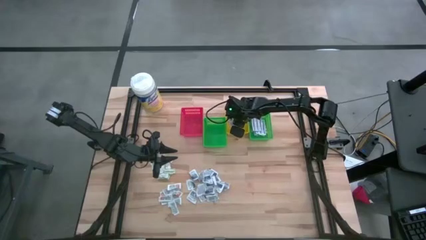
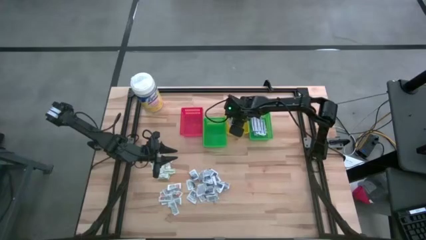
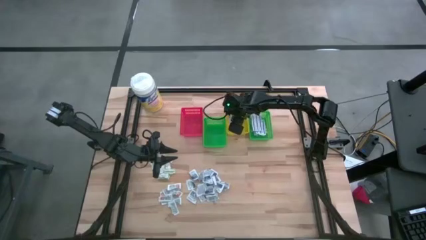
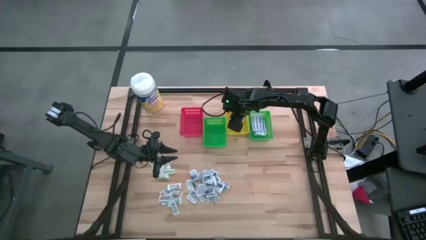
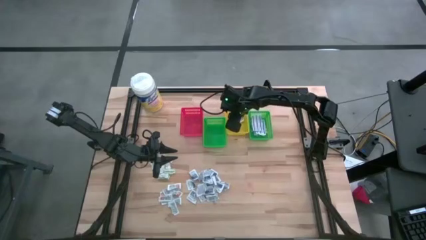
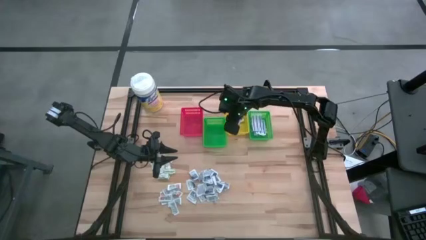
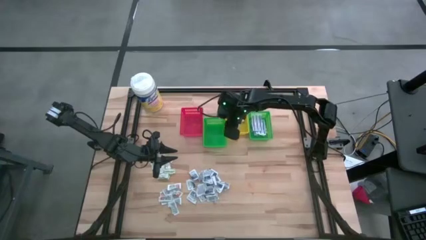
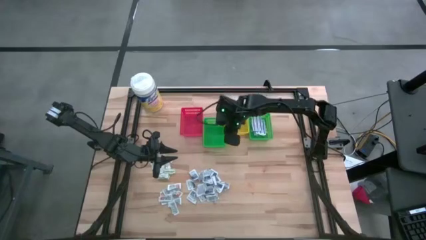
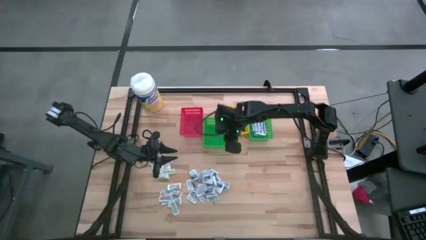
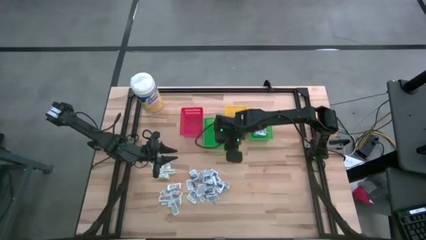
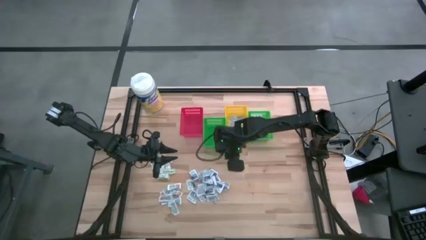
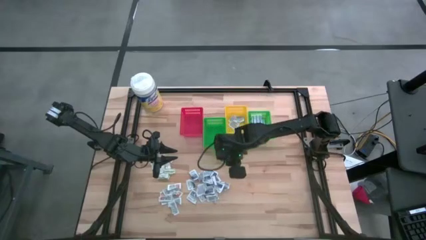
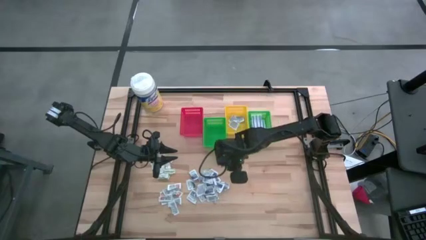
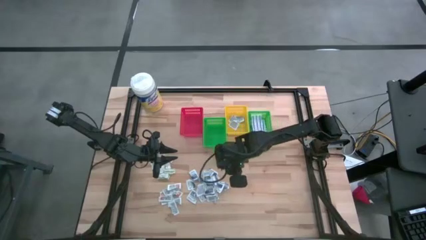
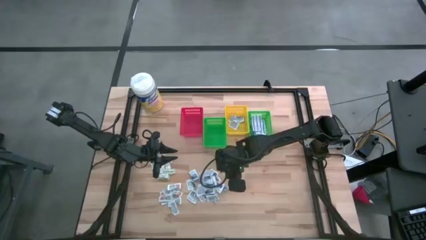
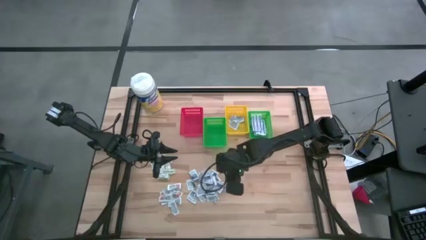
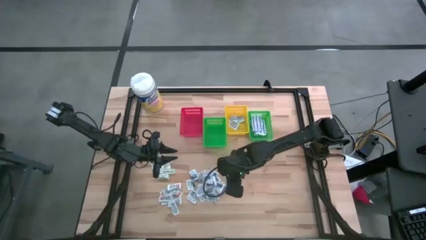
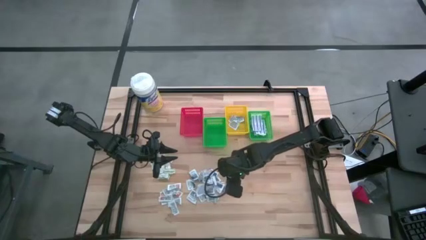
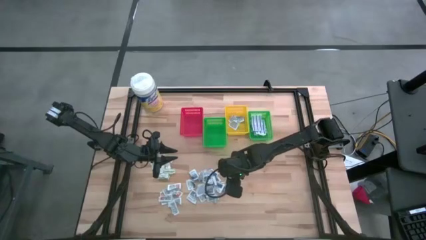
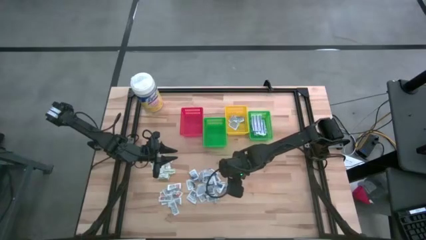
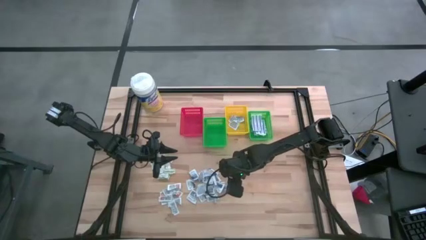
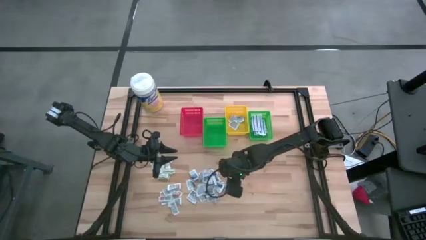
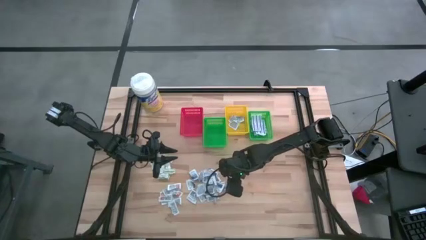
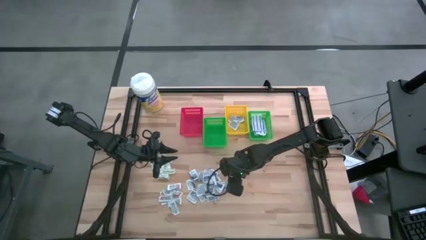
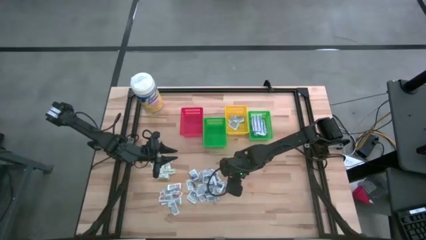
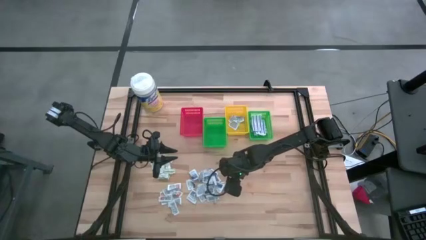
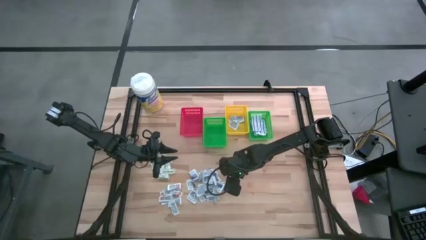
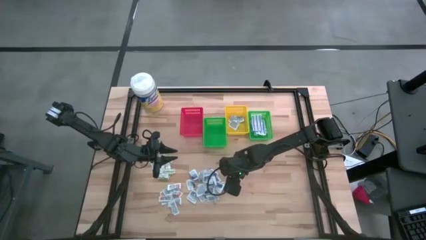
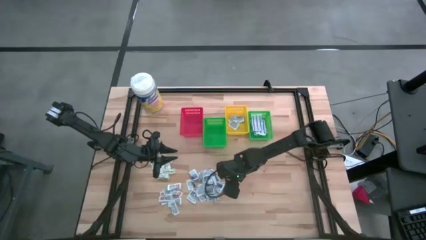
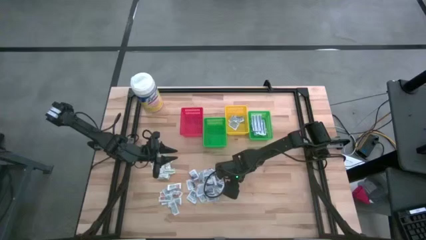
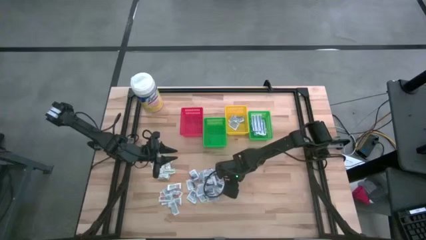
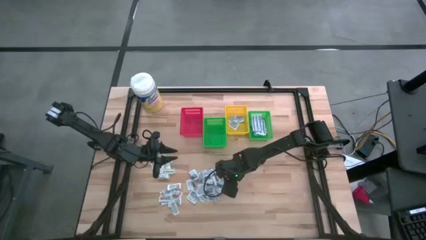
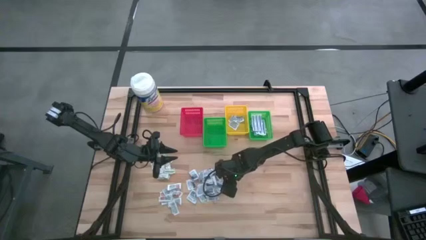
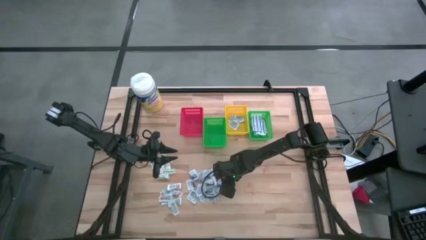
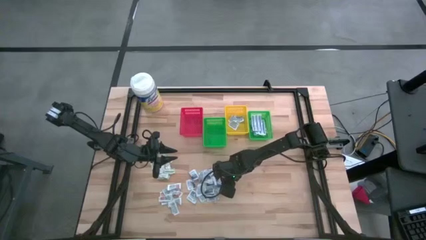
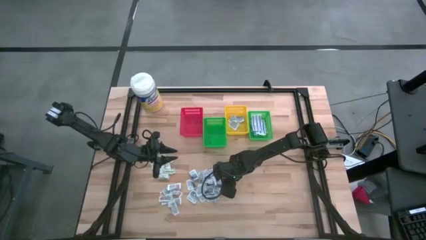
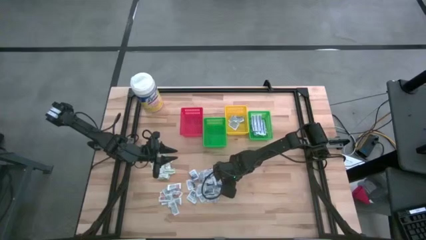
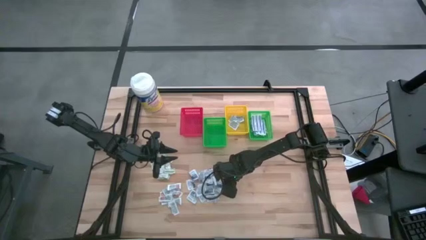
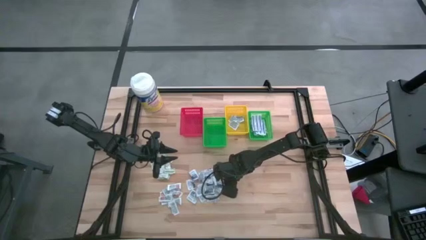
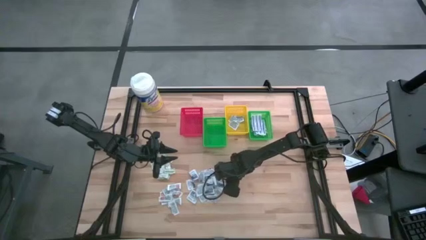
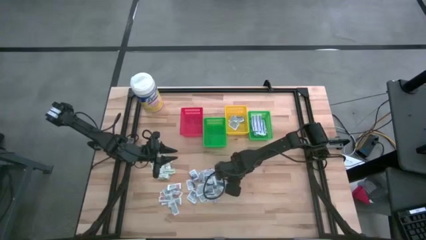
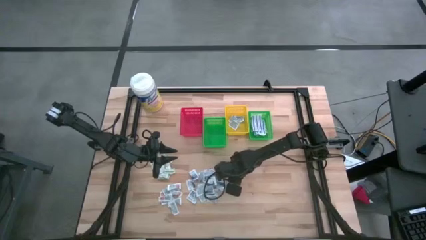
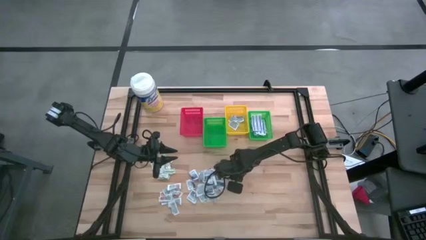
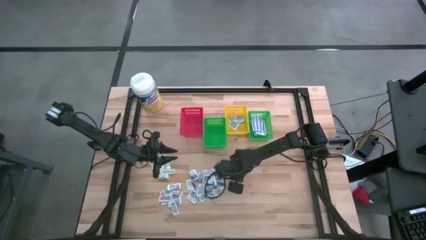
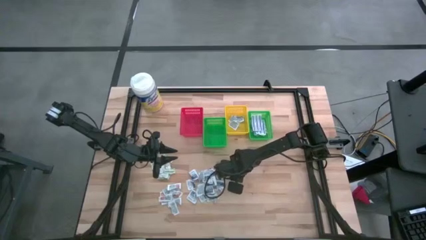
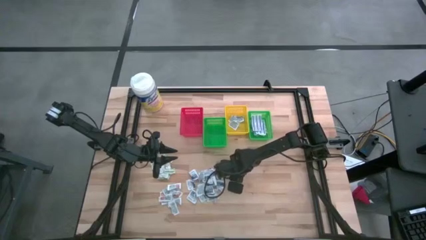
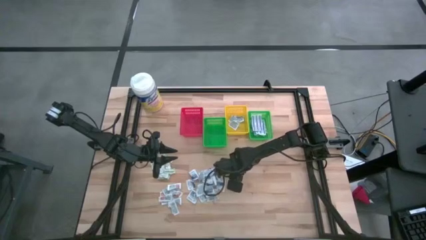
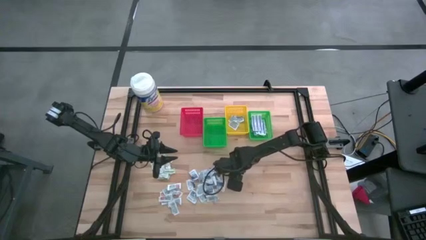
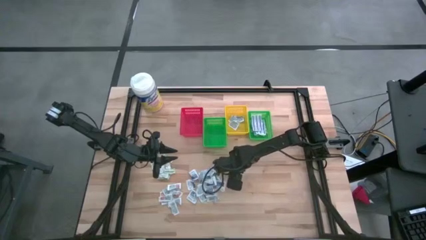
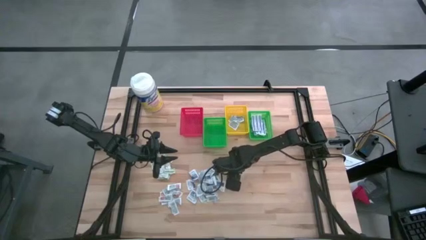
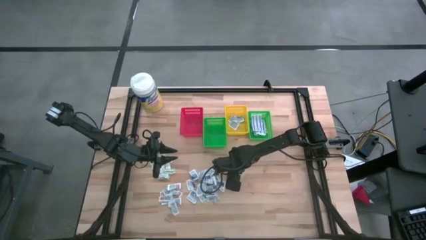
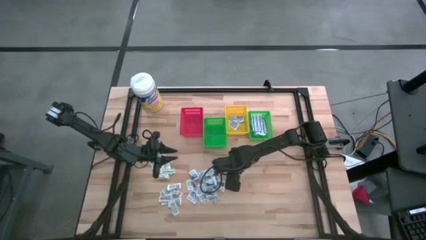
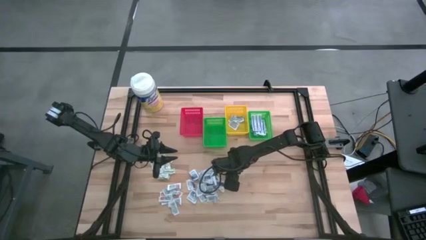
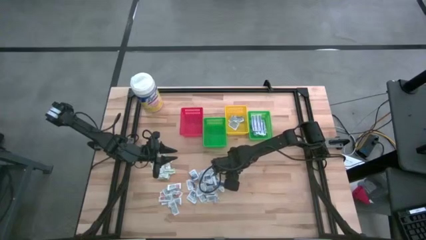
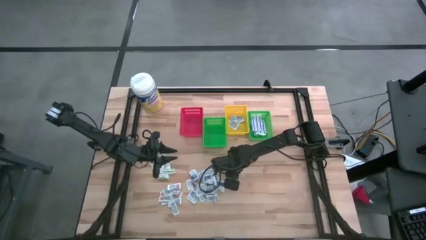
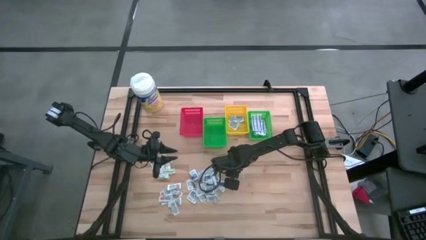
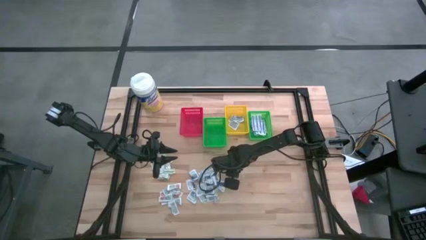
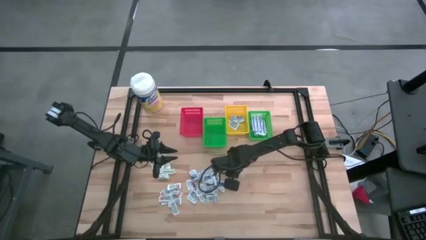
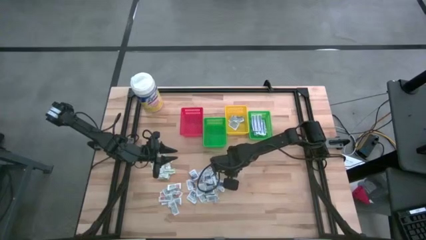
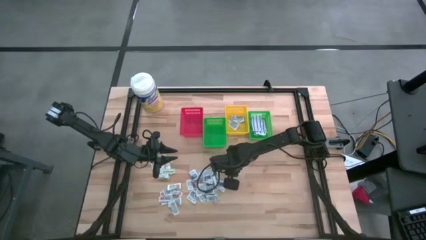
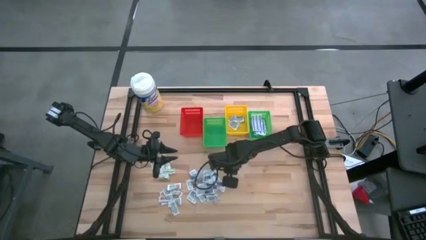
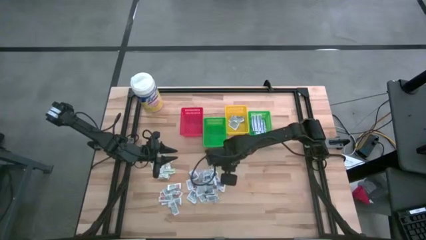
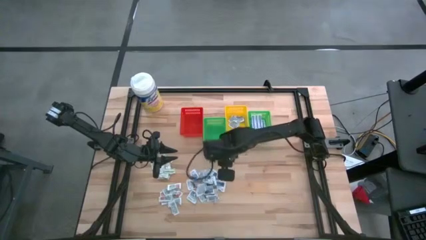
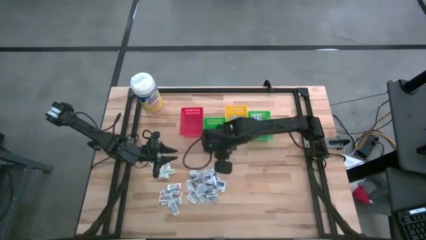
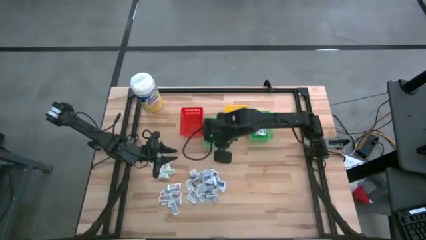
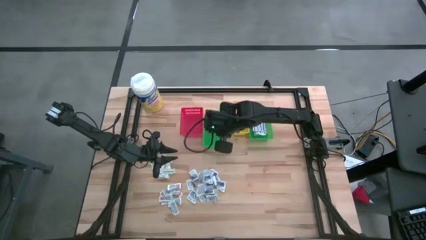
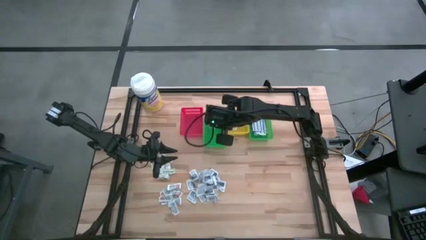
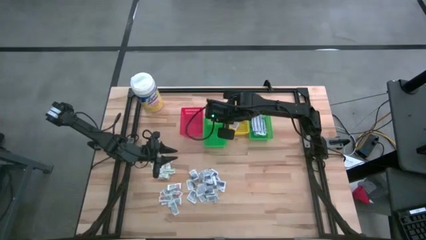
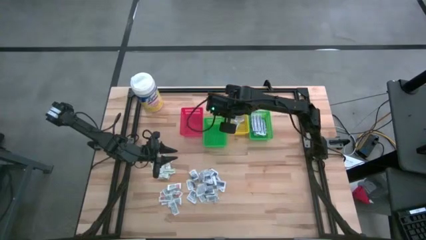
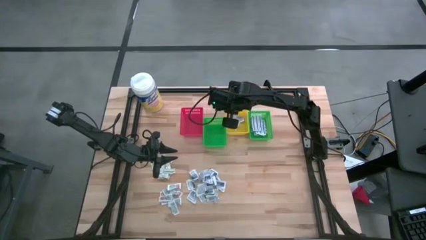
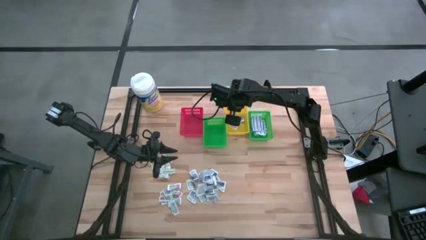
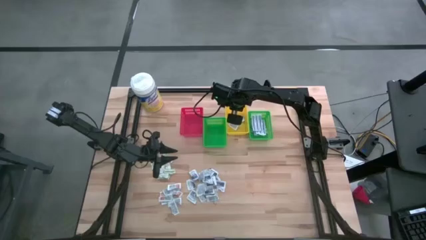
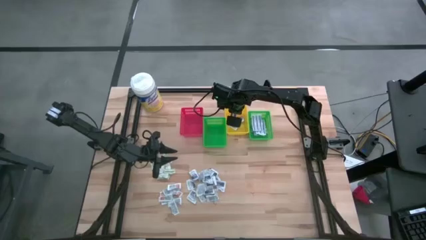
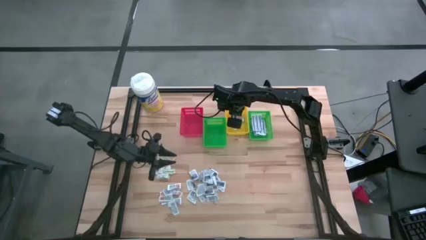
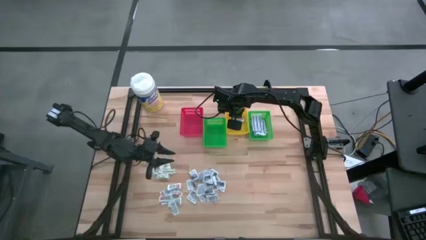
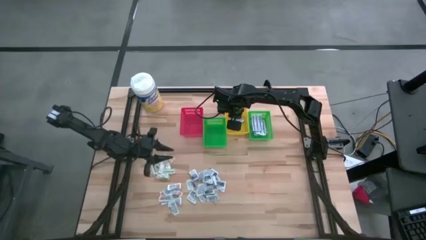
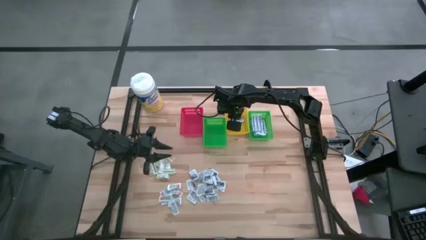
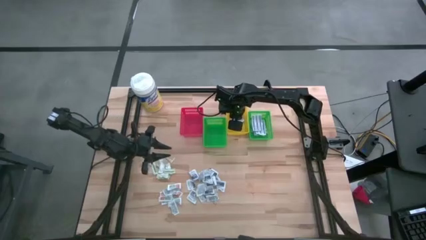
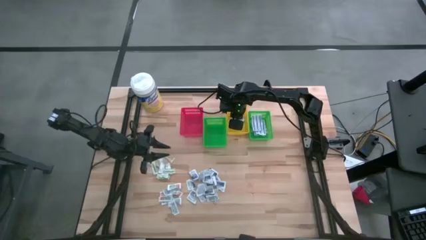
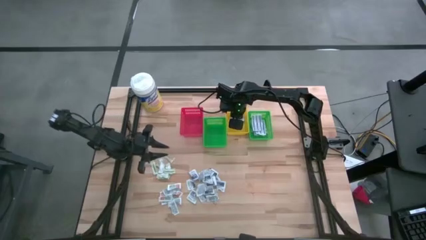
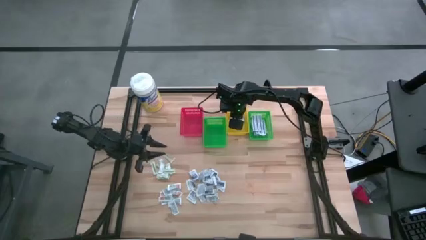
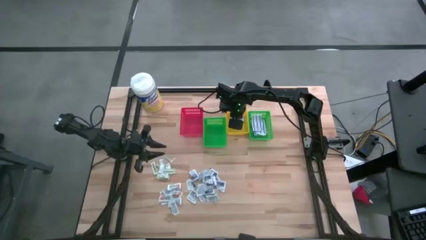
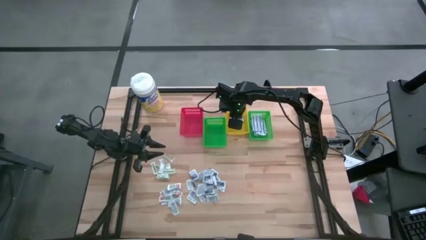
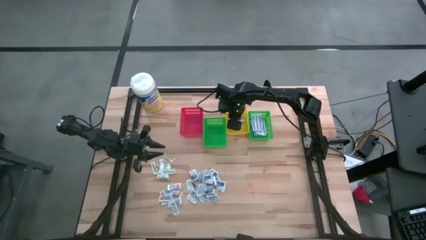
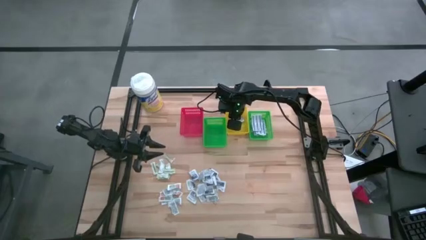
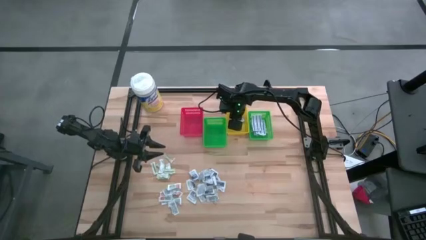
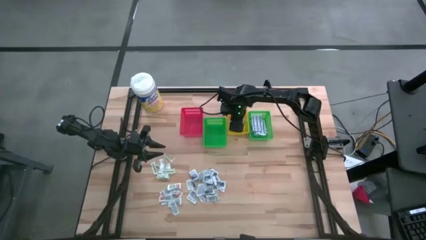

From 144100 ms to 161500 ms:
Task: Pick & Place First Aid Supplies
Put the alcohol pad into the yellow basket
